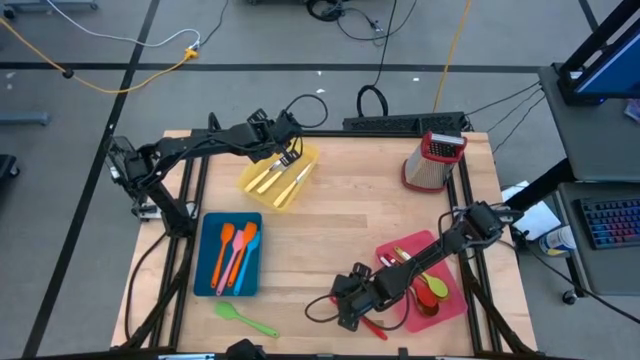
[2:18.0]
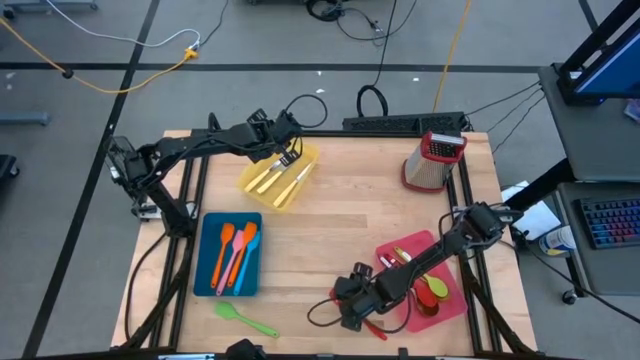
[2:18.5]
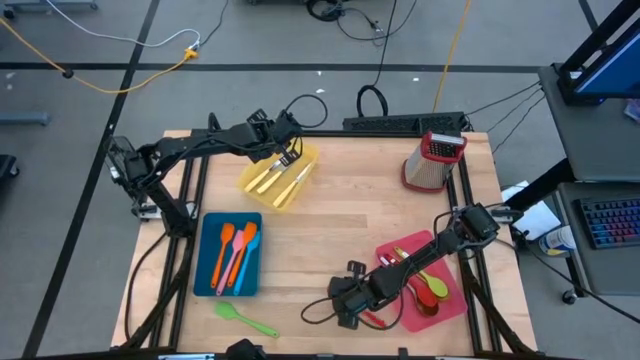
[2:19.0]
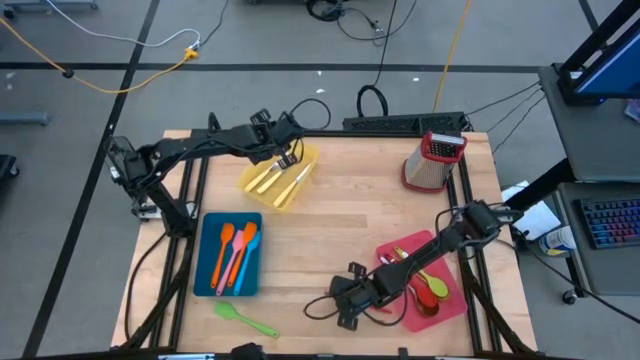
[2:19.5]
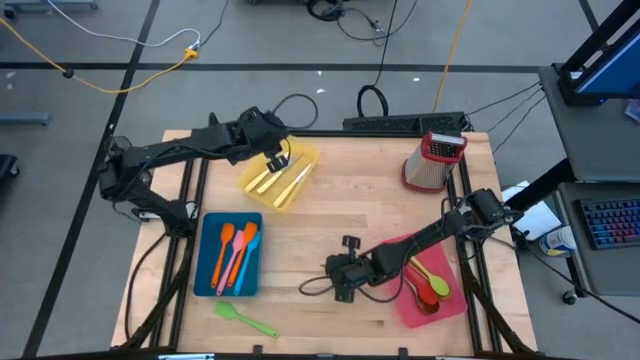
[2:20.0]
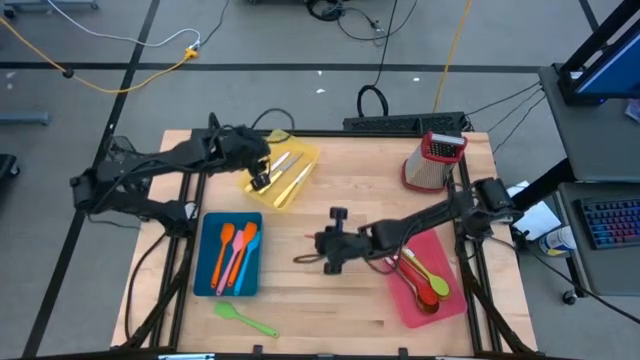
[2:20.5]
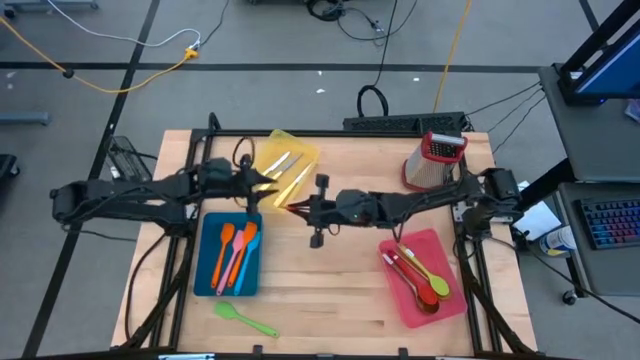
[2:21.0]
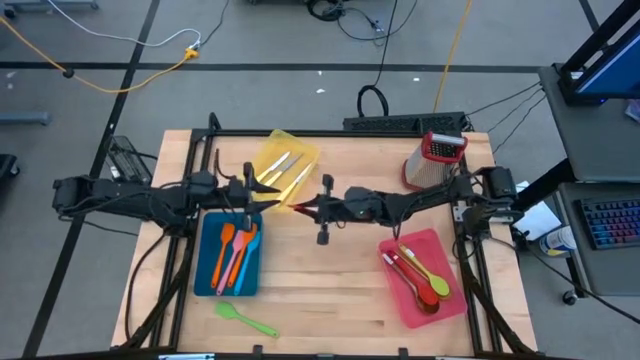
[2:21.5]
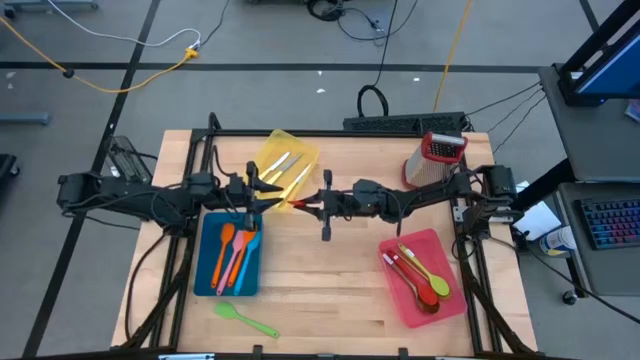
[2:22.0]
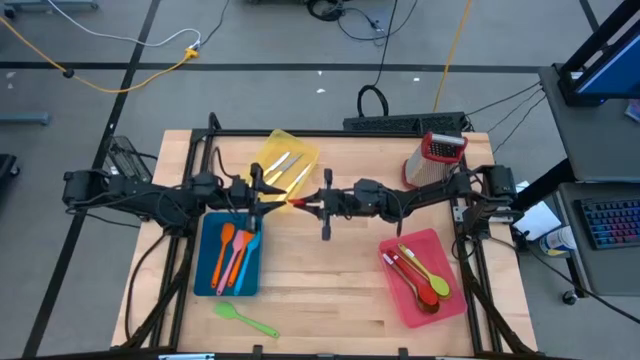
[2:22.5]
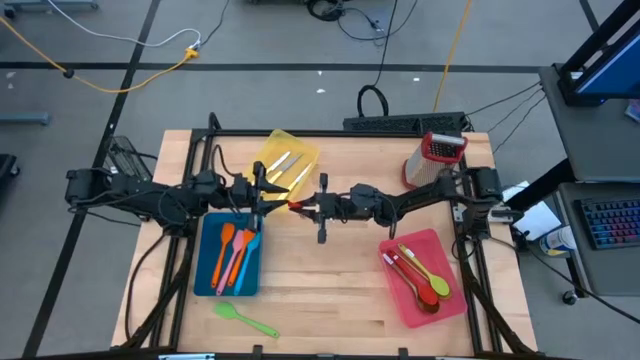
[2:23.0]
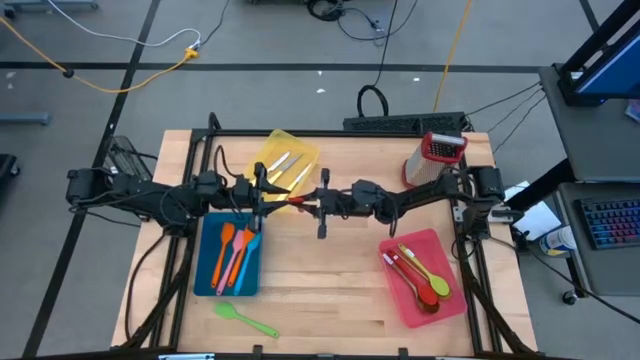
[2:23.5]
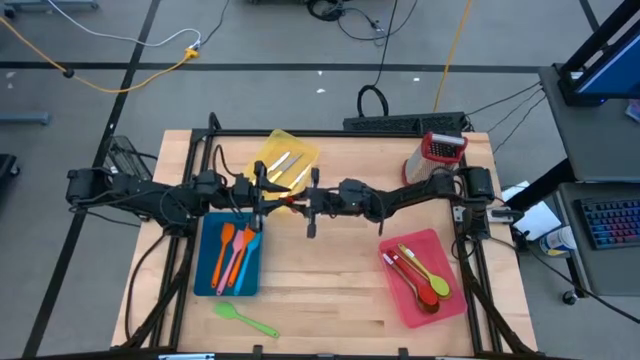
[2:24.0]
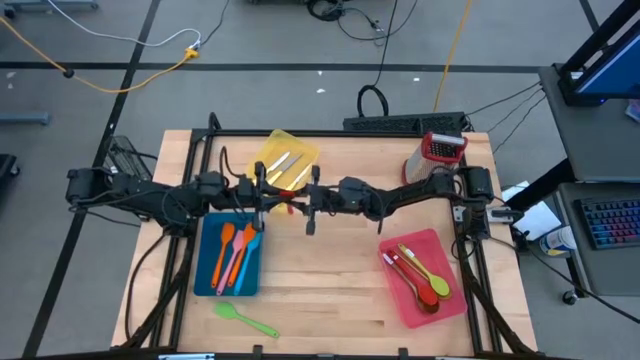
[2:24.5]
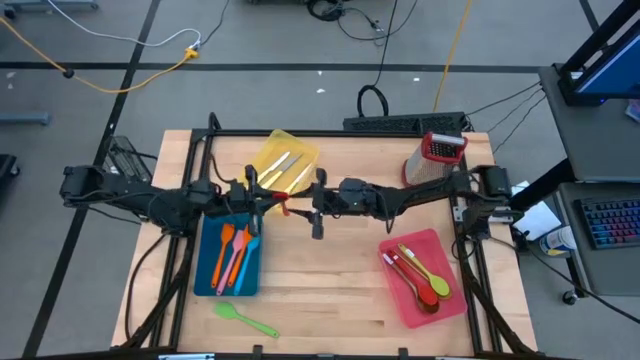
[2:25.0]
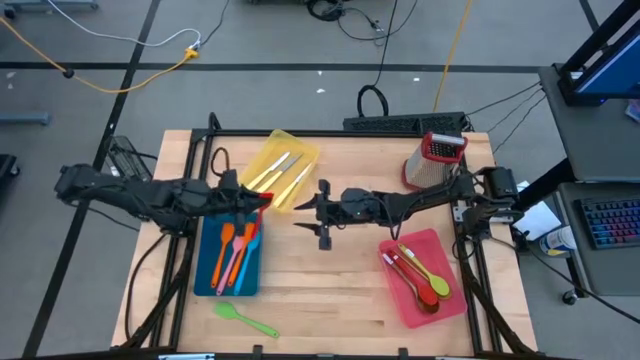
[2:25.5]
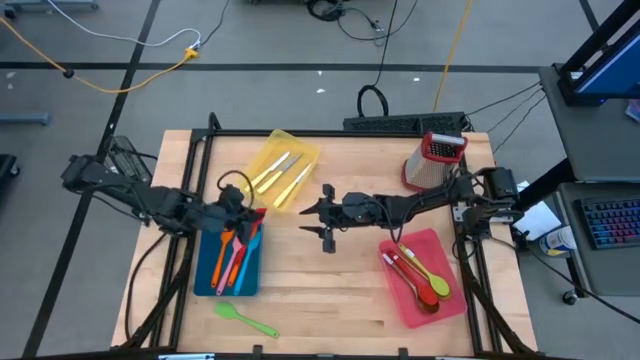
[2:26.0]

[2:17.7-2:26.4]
Task: Pick & Place Kitchen Items
Put the red spatula into the blue bin

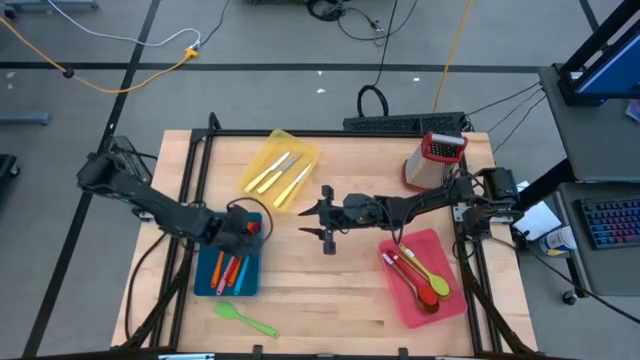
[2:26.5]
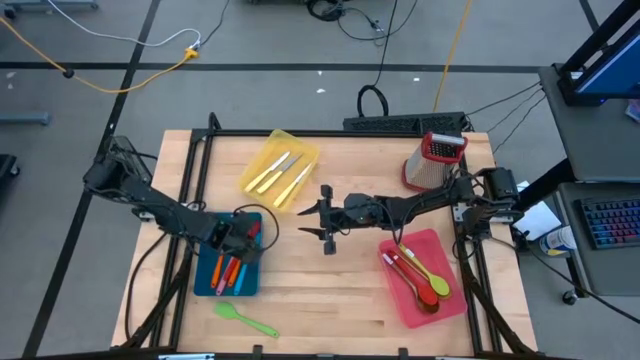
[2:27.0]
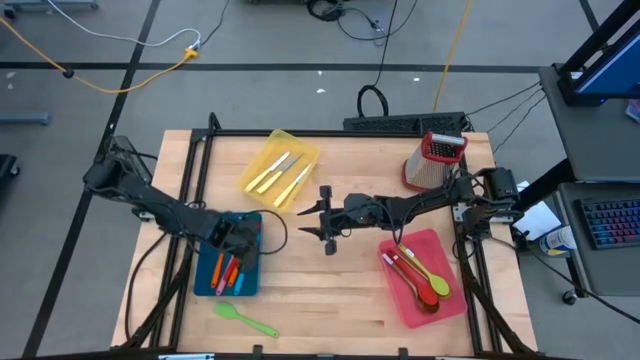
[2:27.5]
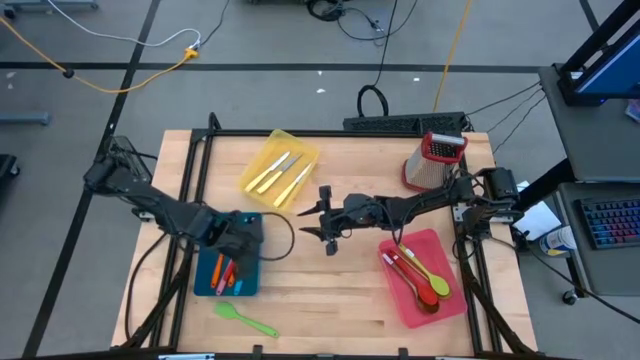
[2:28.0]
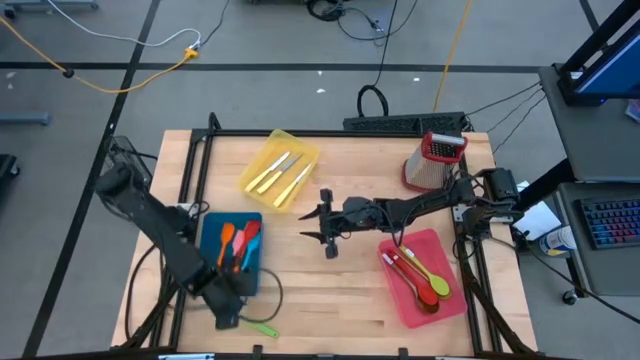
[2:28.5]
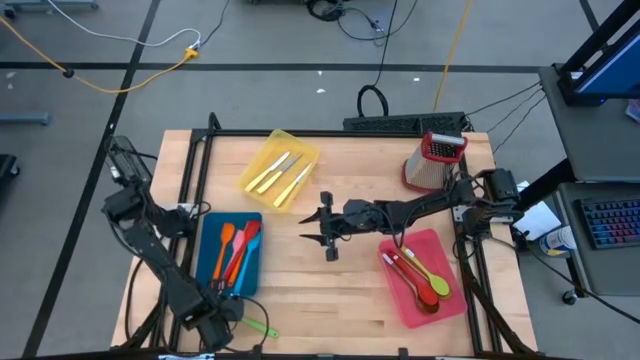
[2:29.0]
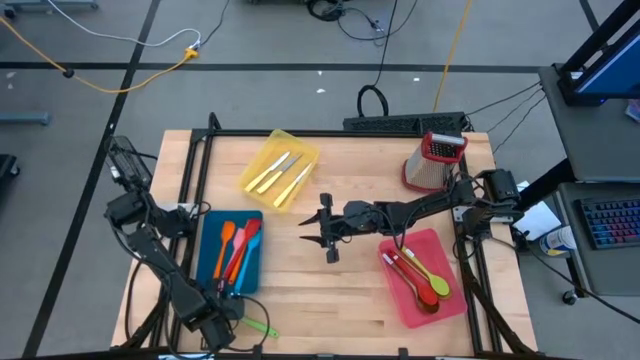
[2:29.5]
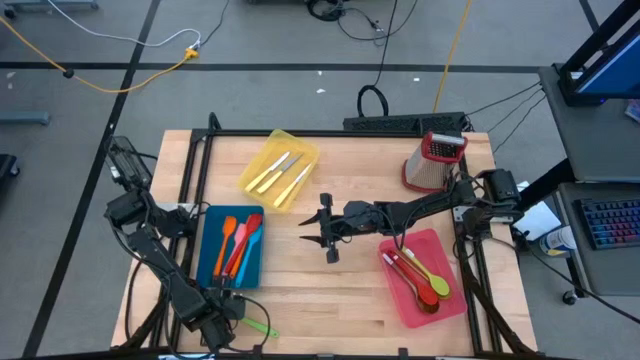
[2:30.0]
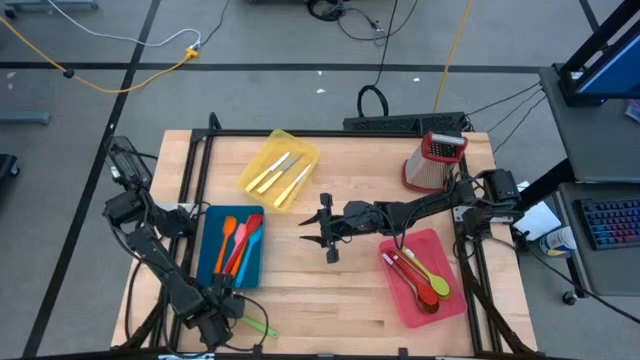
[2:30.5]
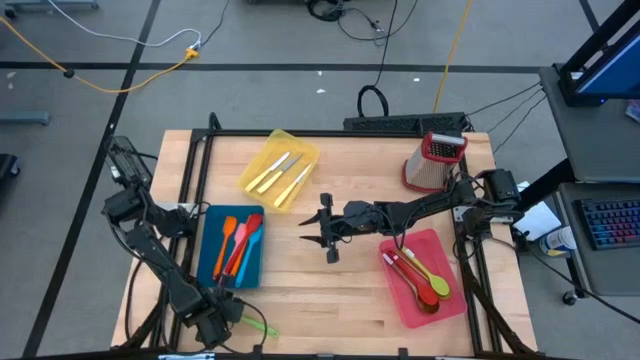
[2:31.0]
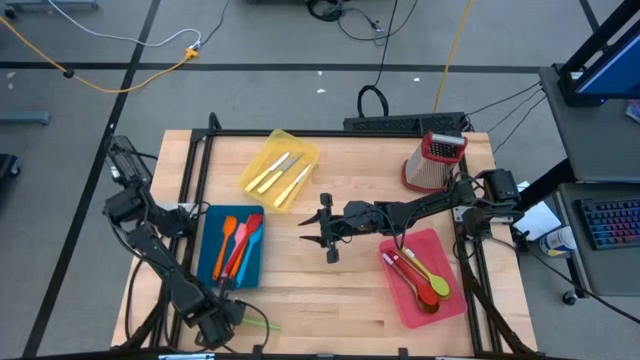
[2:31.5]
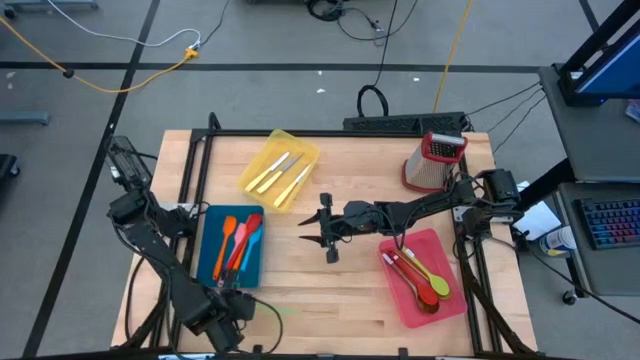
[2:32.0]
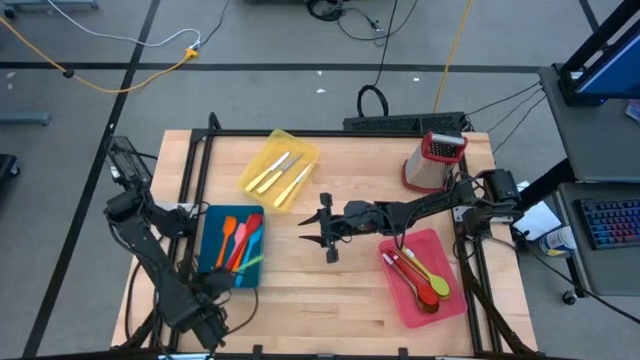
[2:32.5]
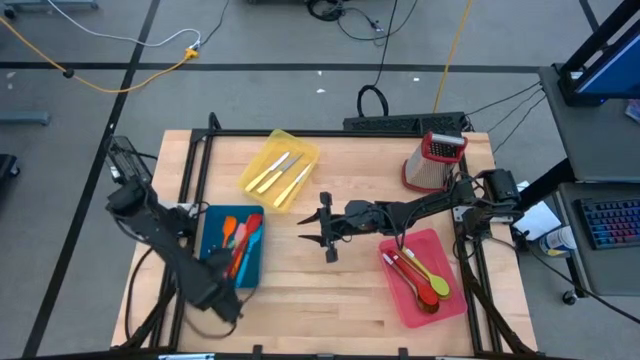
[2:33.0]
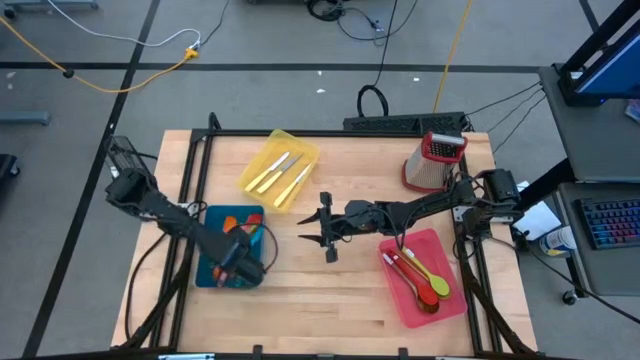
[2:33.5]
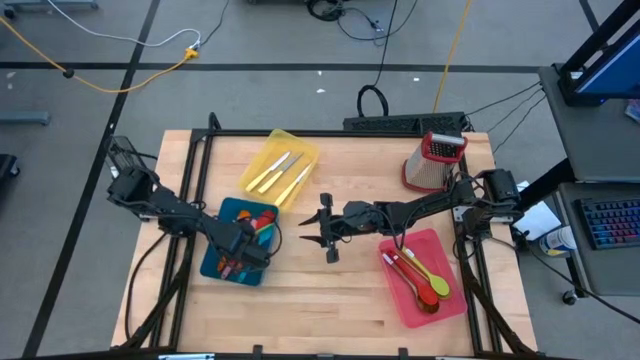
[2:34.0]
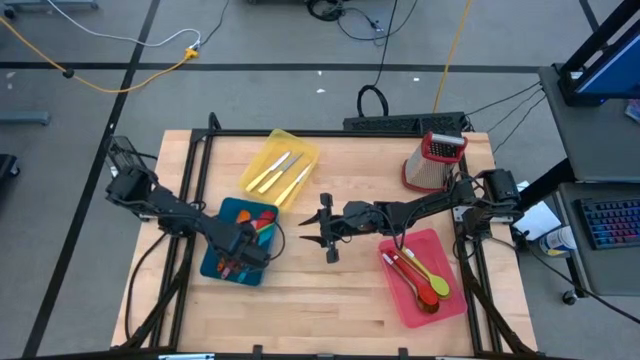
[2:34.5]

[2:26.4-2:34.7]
Put the green spatula into the blue bin
